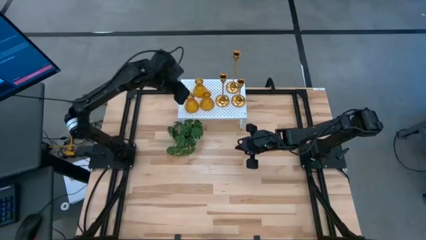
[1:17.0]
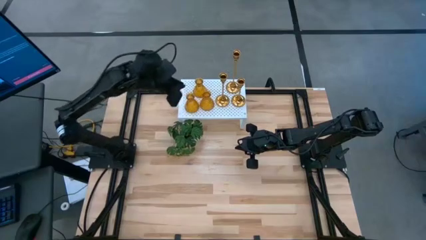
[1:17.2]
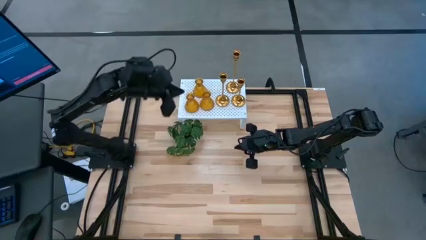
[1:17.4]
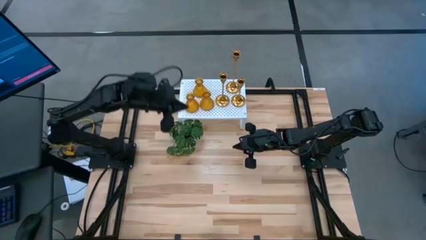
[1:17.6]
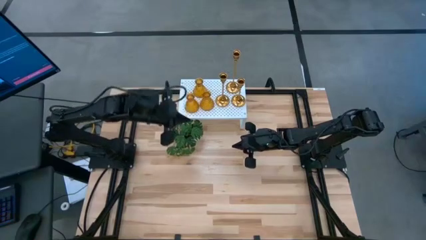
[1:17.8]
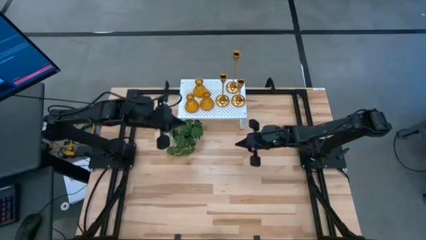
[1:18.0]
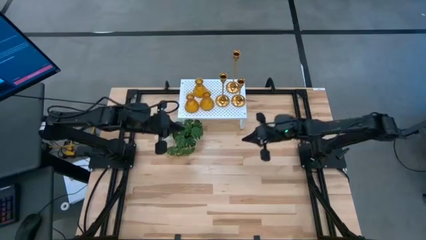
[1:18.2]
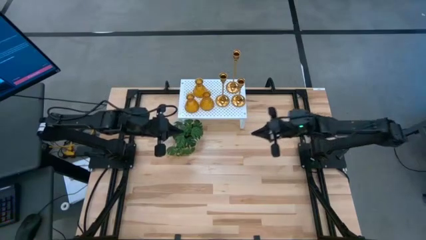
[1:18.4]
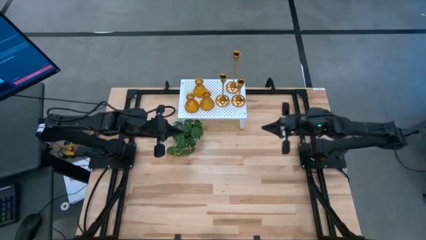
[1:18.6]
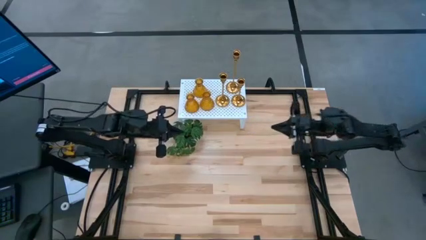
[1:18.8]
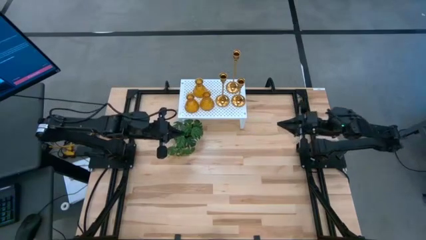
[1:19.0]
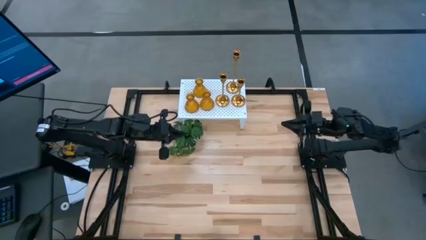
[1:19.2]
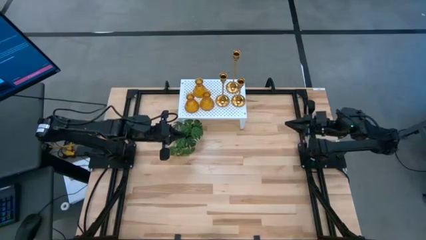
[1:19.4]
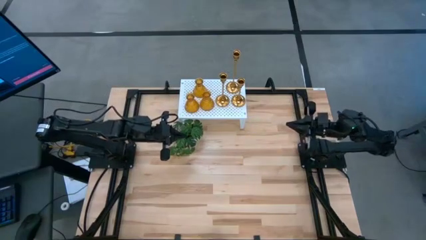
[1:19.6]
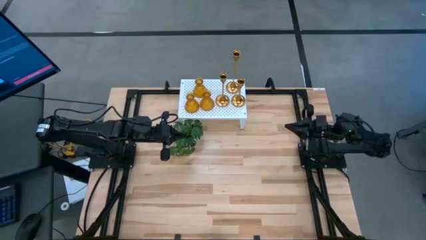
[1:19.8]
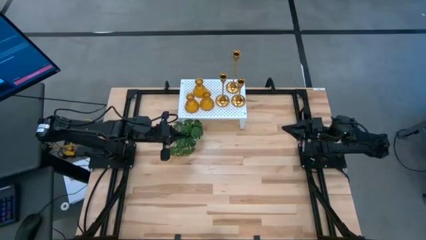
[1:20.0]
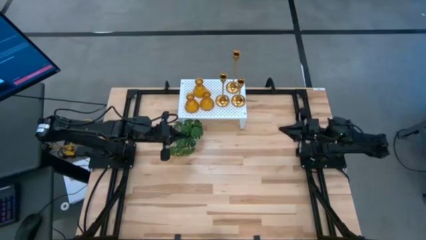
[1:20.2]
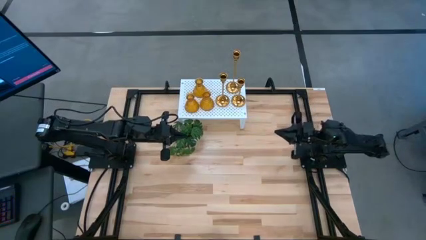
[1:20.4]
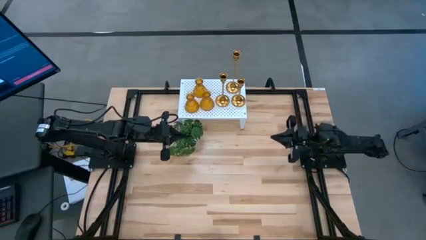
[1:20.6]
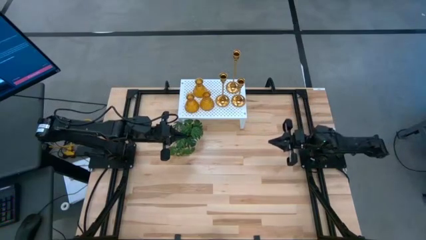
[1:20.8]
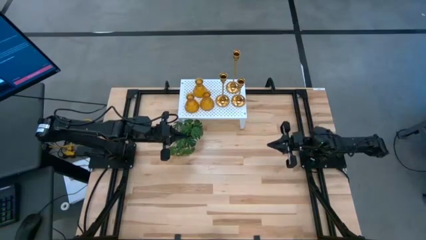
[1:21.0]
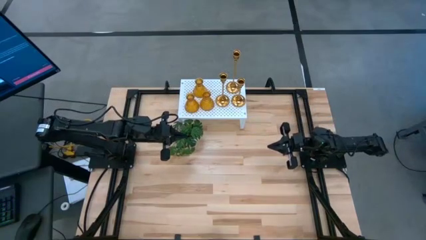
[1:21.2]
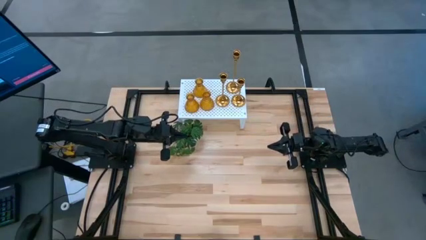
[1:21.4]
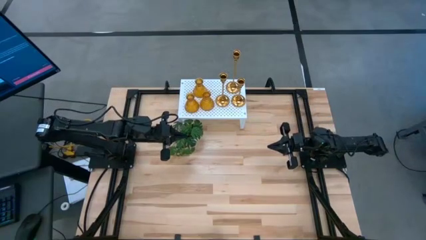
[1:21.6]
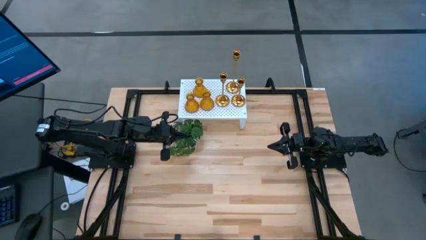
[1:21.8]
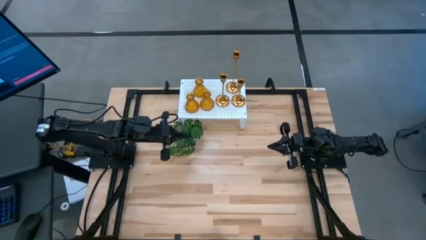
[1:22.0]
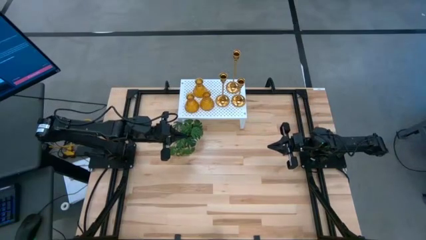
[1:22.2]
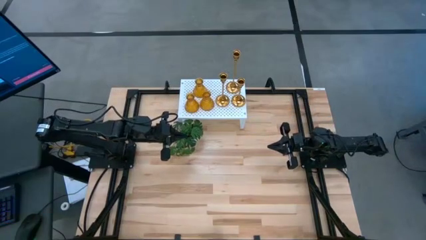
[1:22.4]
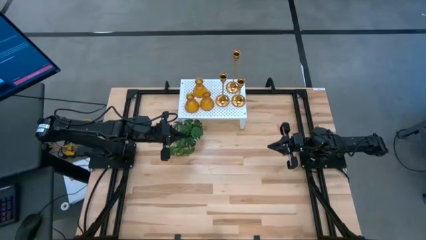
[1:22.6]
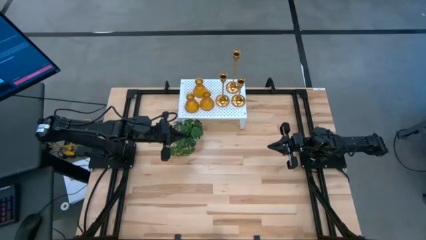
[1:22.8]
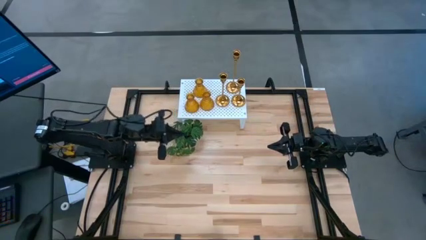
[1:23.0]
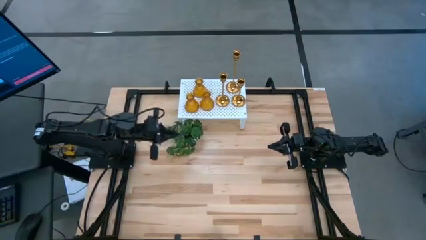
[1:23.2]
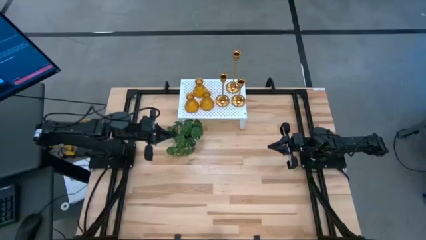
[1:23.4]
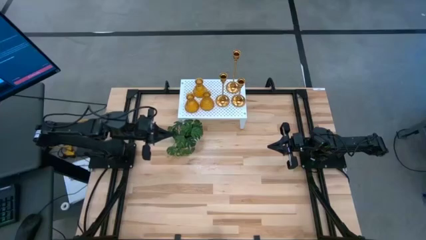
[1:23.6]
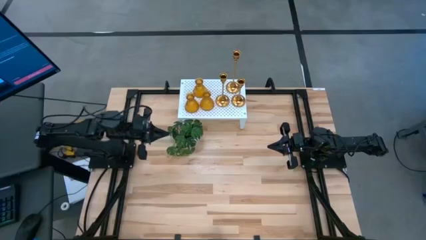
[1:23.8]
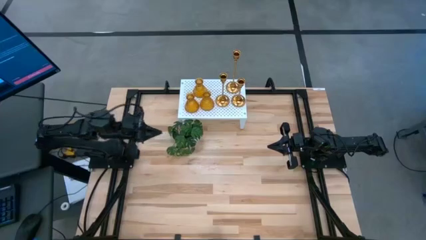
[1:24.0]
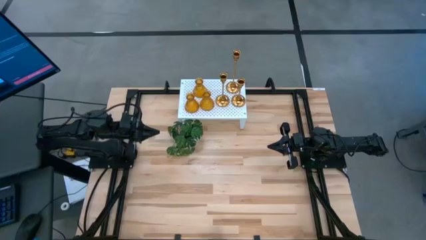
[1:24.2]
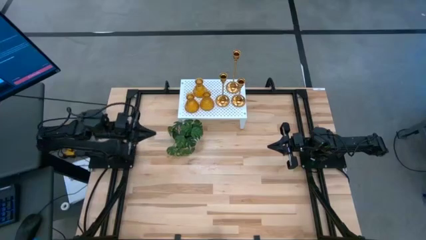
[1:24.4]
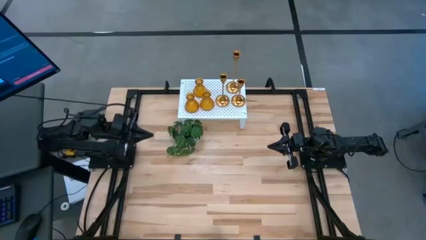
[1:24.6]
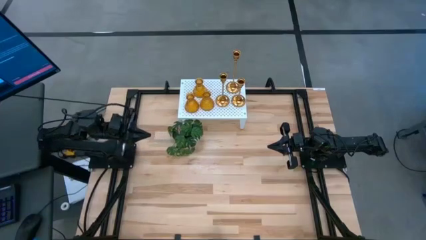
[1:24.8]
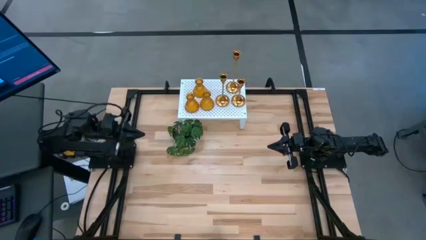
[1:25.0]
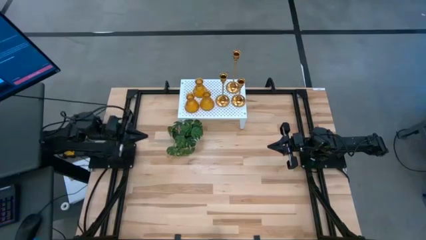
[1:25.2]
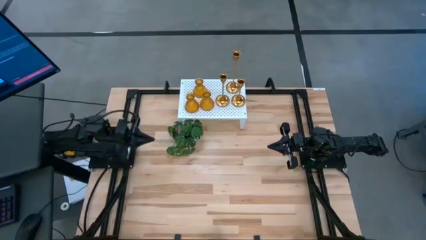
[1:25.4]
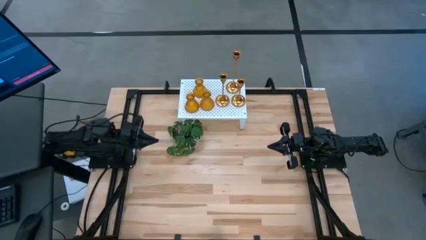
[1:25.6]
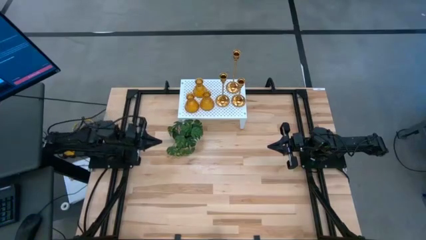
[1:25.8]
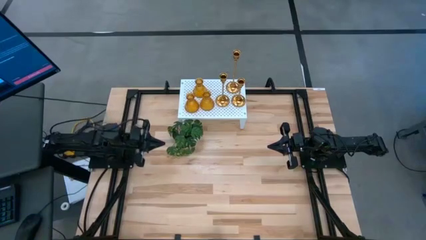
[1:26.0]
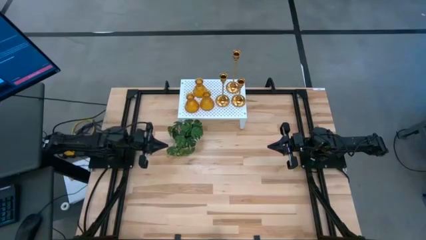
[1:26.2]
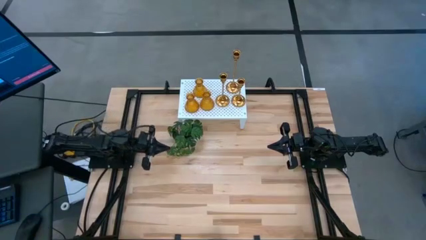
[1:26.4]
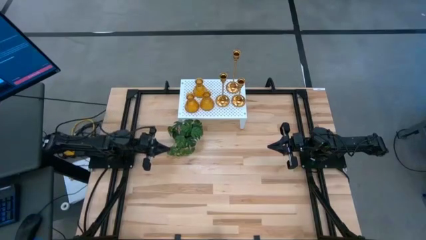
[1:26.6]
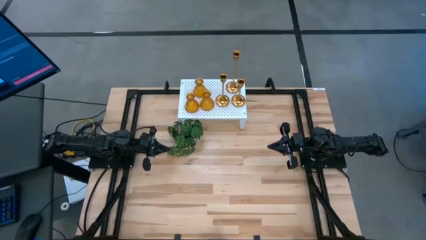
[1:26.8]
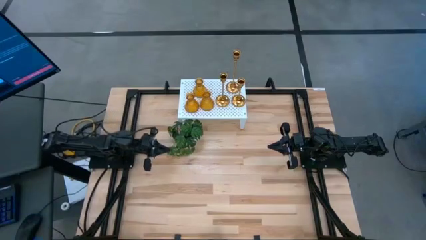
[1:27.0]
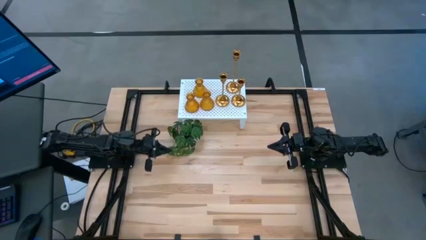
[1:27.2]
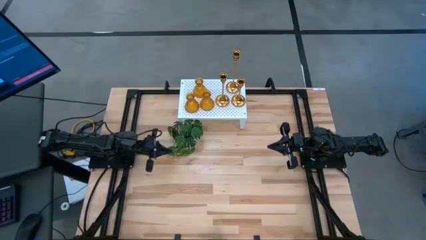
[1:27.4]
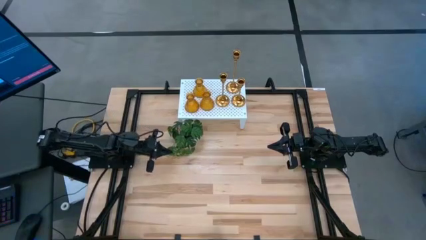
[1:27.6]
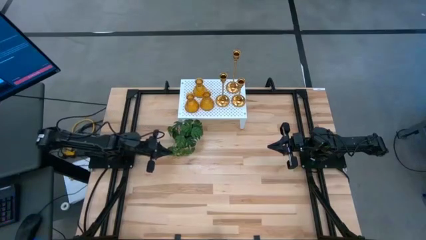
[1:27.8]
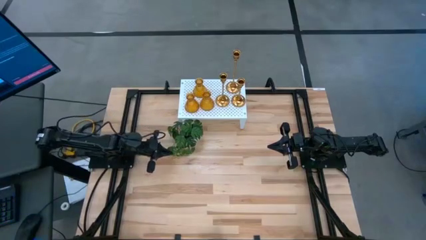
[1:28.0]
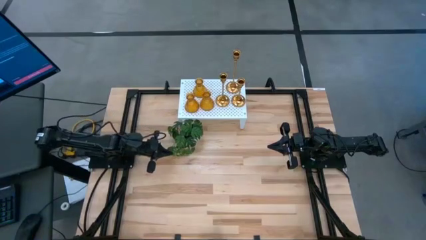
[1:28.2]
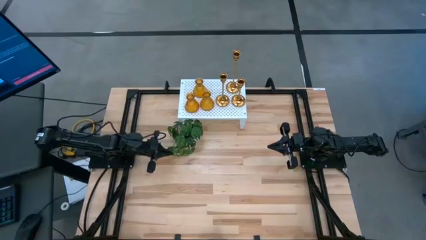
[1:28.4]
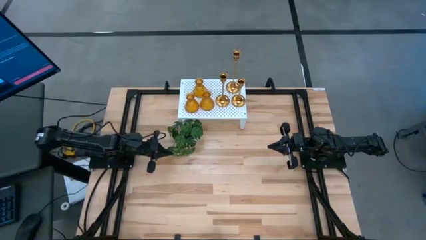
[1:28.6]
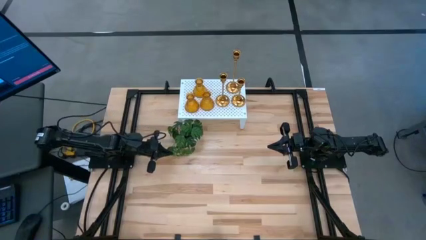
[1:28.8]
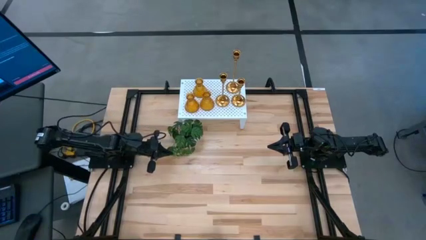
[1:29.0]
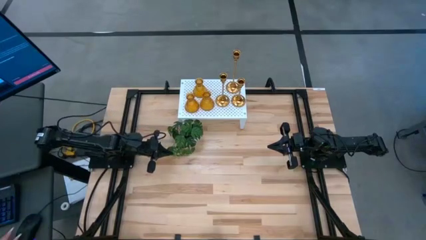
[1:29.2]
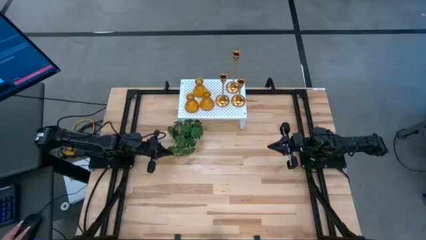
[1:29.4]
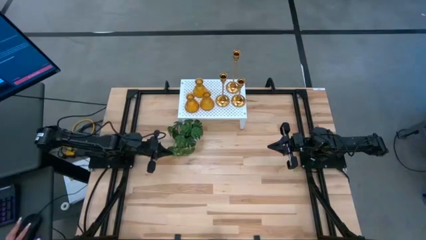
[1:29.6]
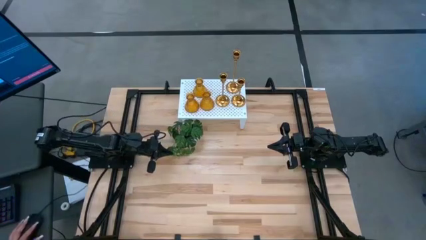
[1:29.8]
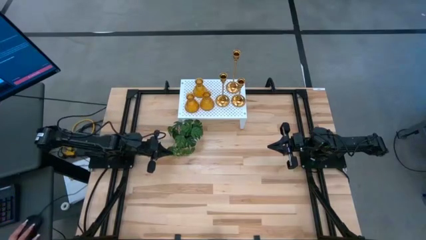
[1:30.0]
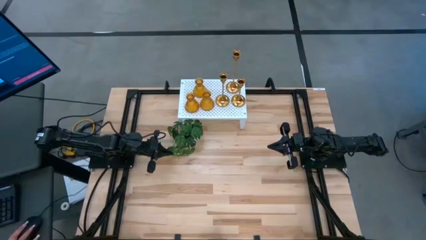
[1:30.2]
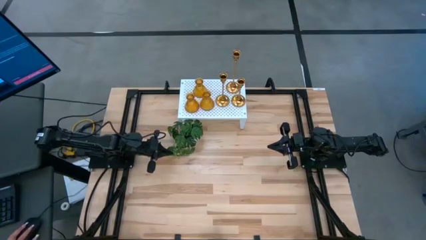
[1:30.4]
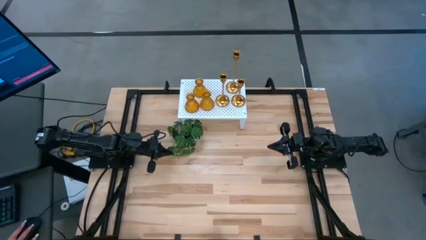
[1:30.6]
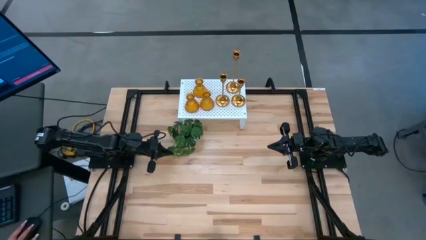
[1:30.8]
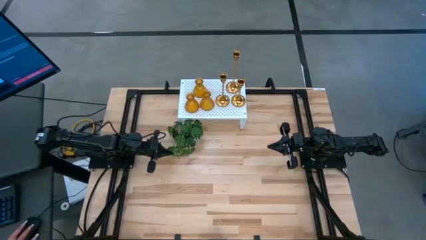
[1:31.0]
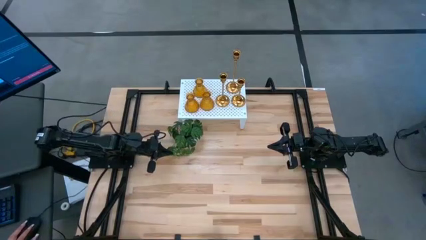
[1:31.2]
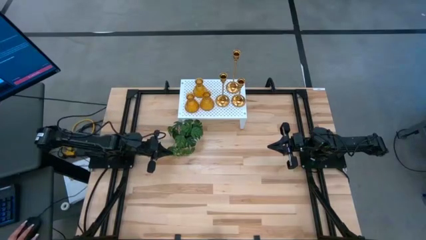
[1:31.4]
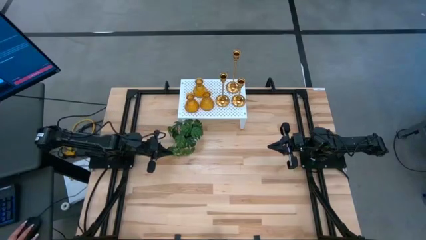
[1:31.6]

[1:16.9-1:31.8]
Task: Pick & Place candle stick holders
Return to Home Position
